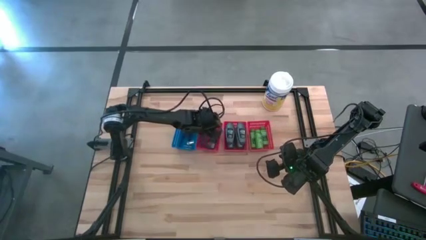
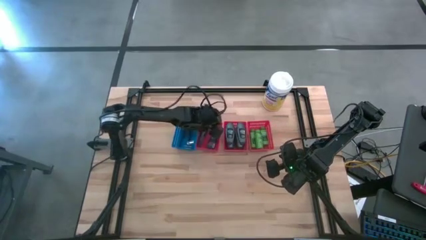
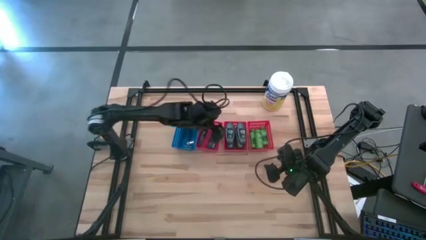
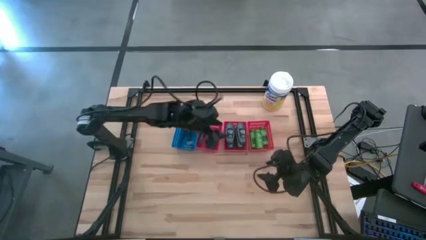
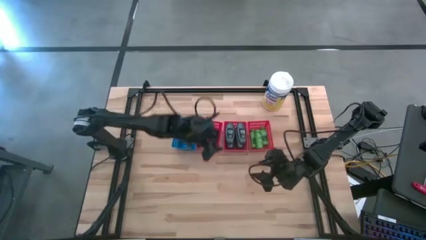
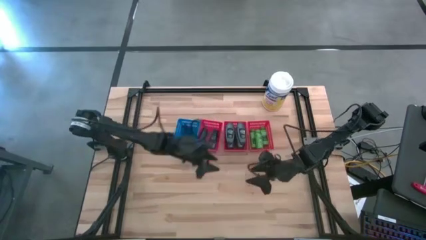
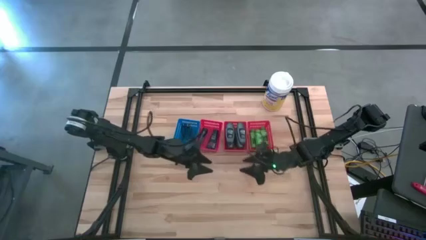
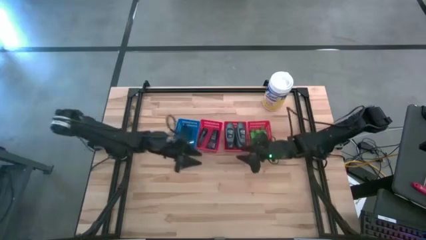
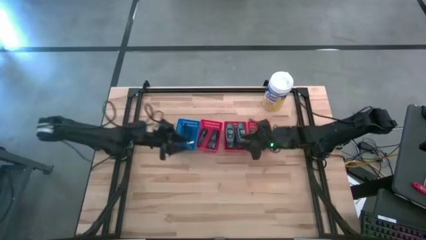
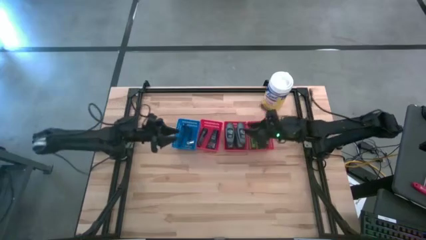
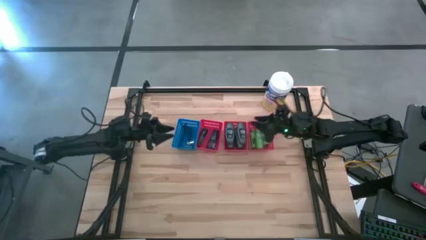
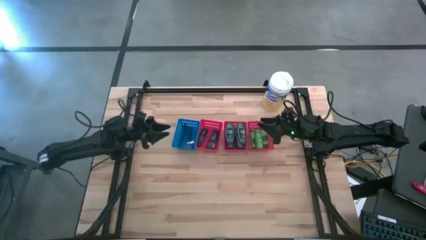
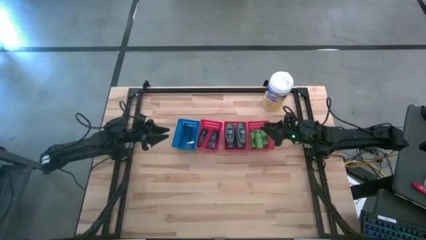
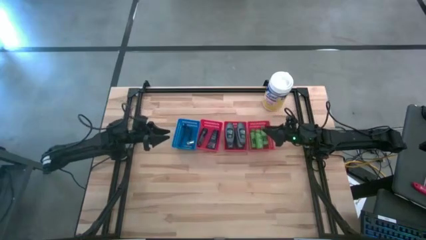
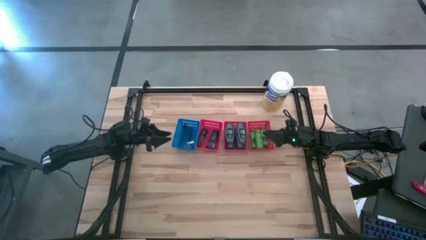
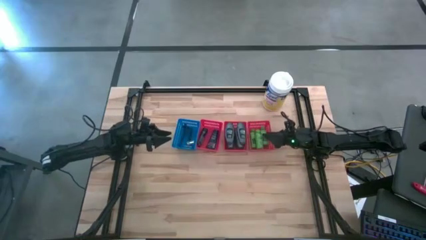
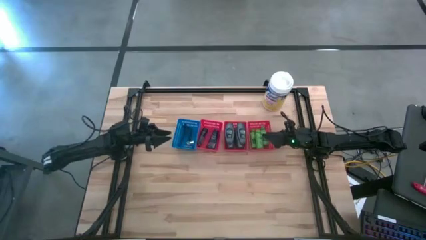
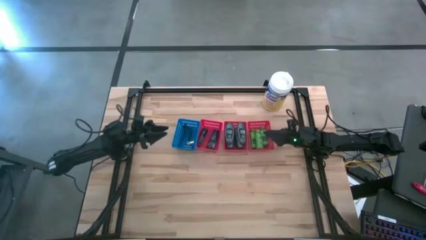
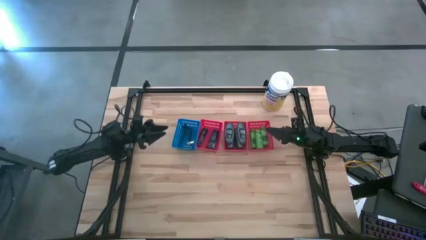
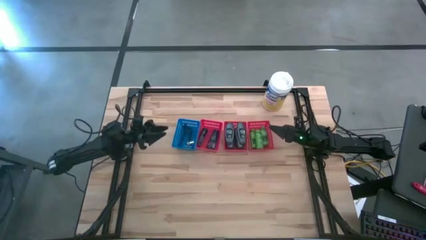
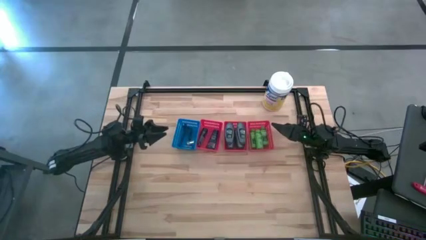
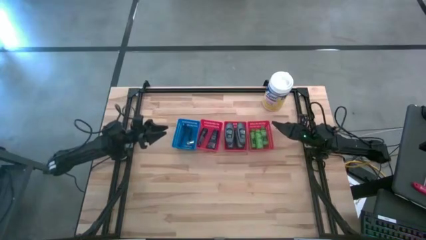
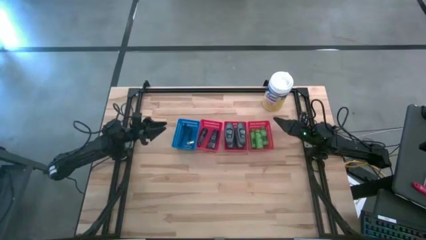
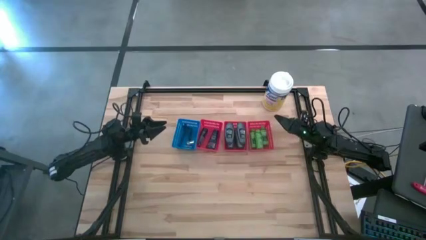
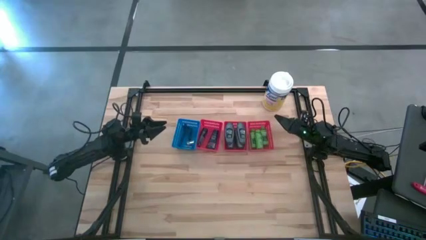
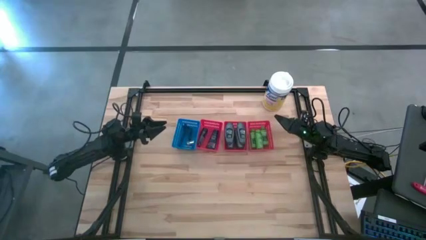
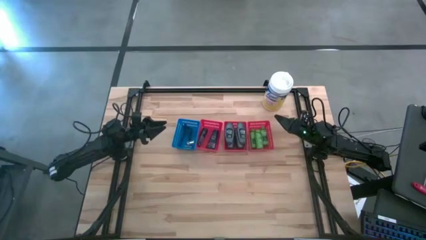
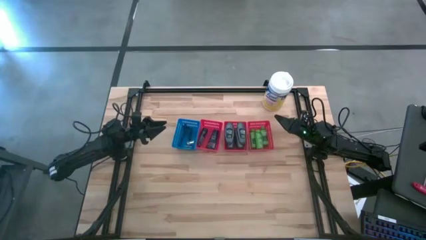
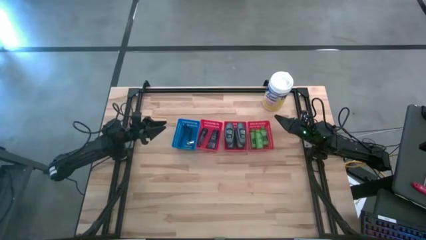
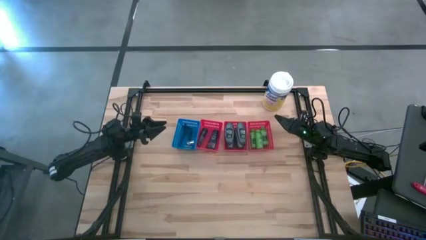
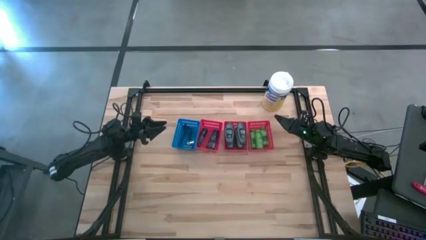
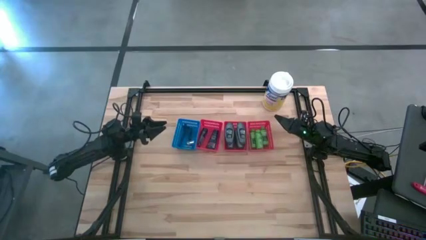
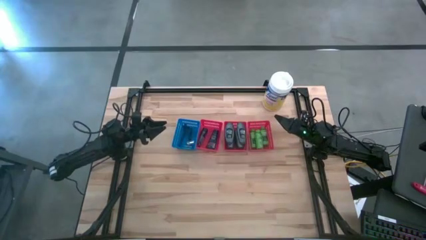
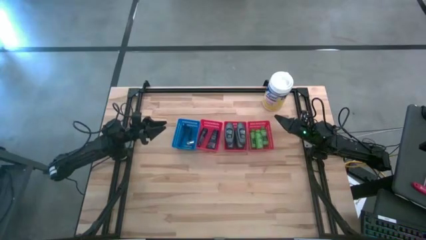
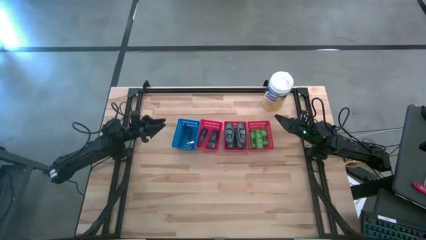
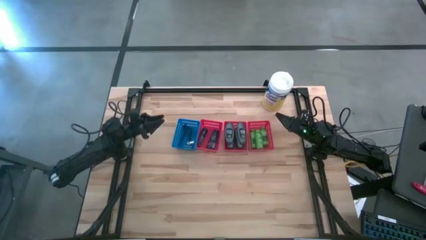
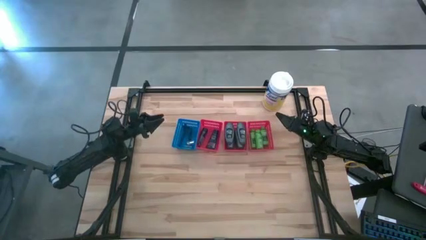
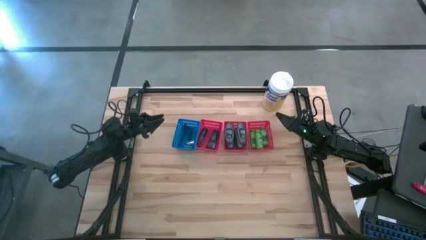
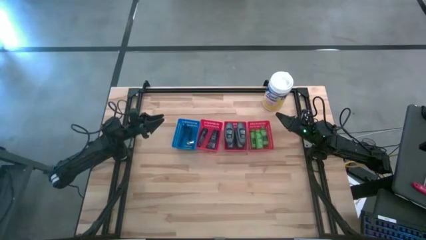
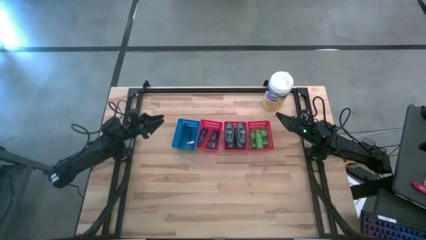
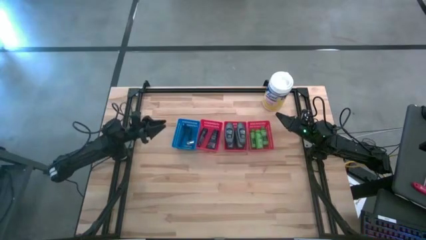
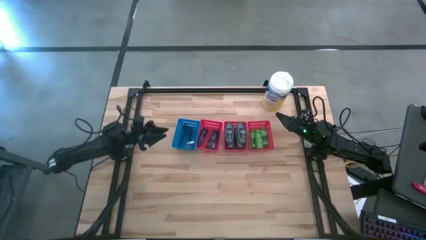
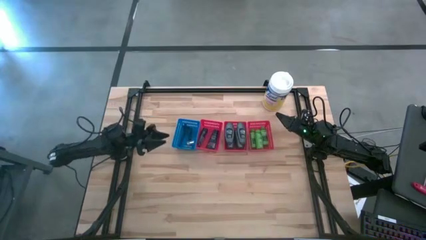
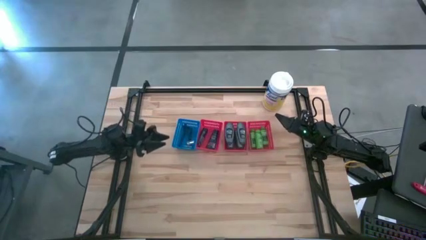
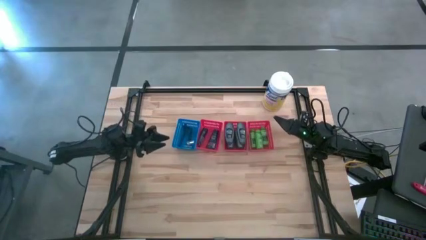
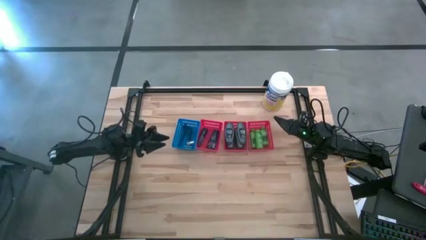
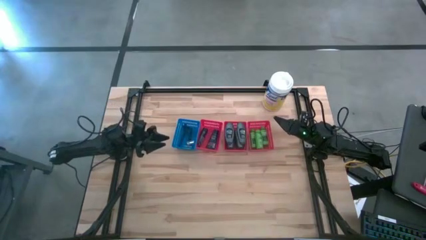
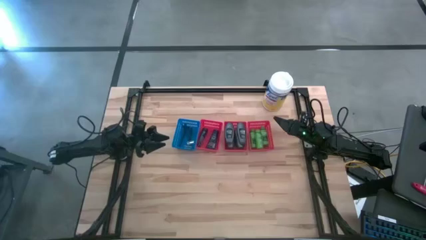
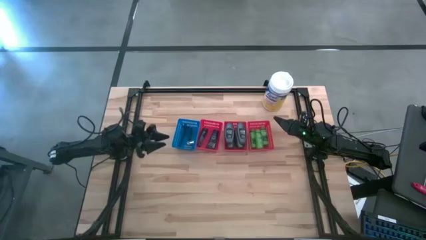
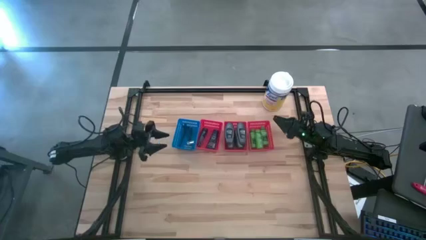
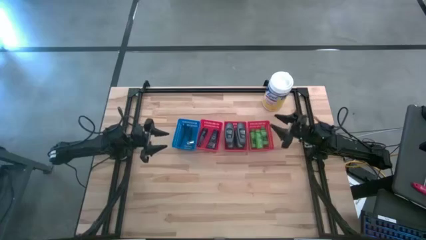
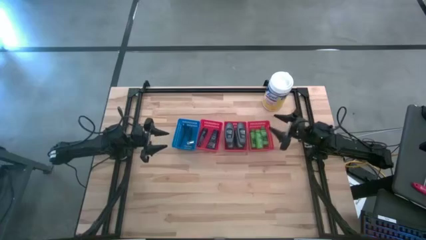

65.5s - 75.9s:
Task: Pick & Place Travel size toiletries
Return to Home Position

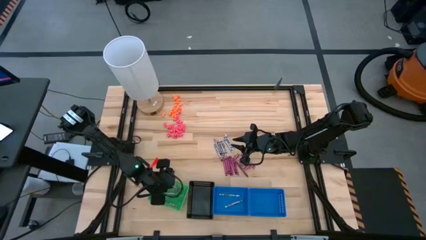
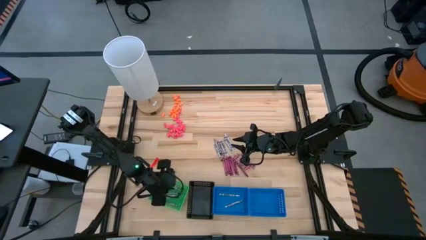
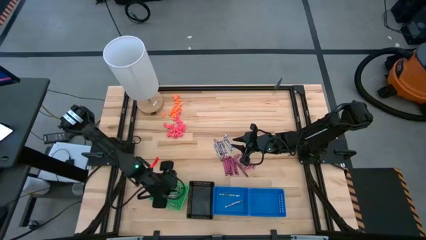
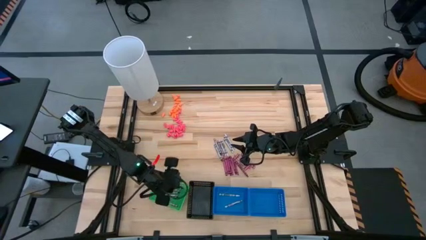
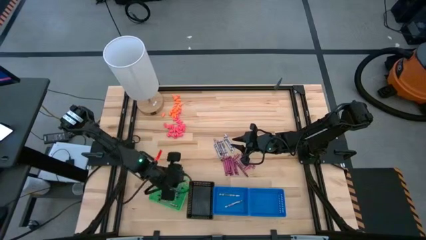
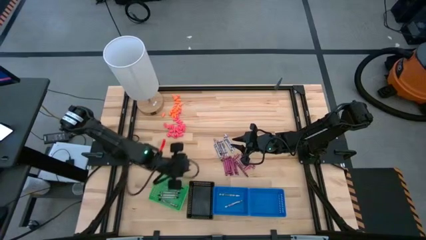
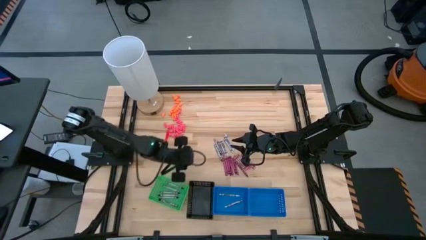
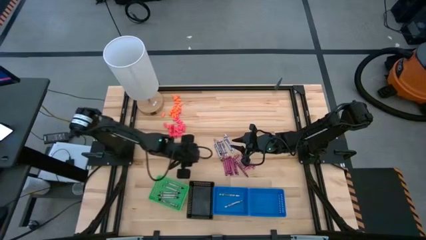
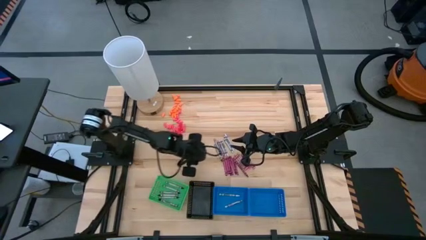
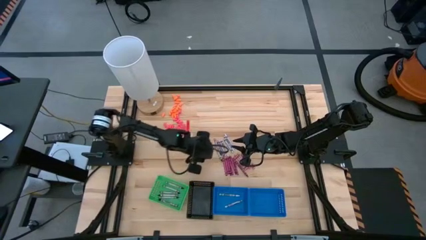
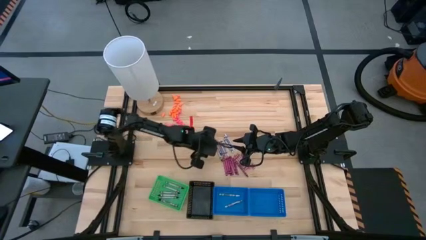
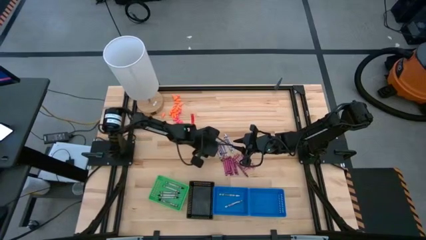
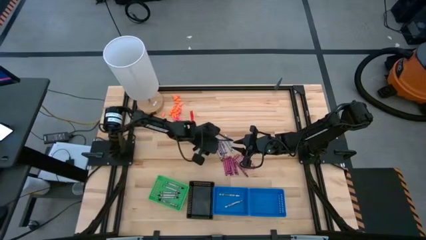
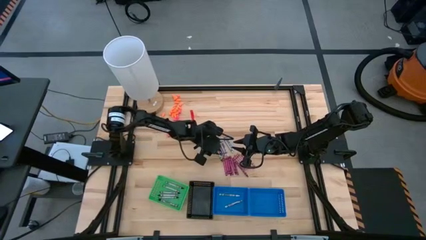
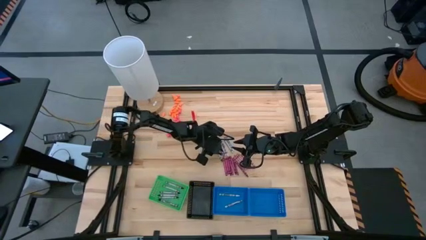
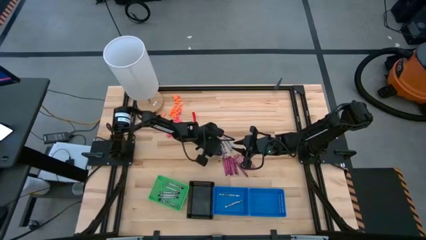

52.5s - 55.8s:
Task: Sort crayons
Put the black crayon into the green bin
